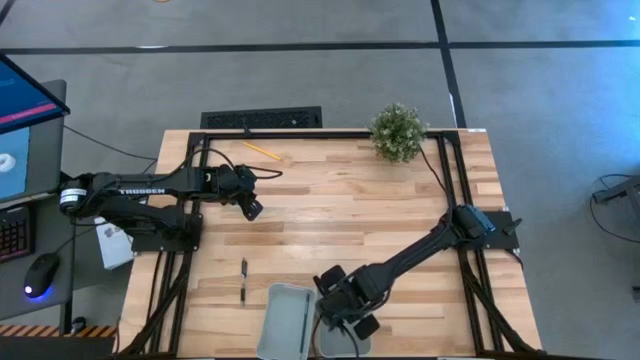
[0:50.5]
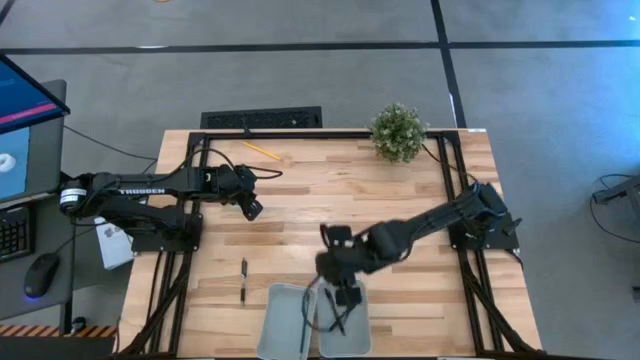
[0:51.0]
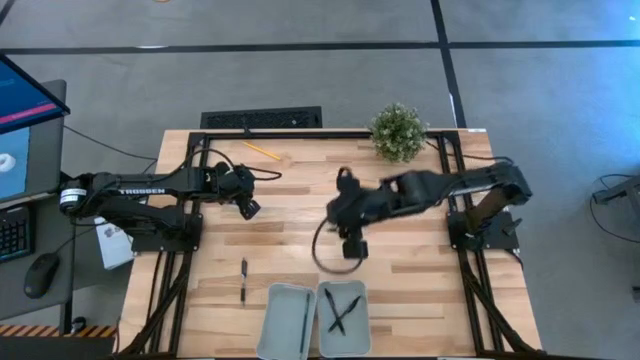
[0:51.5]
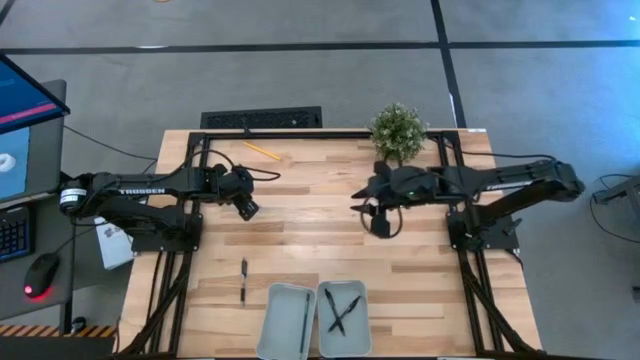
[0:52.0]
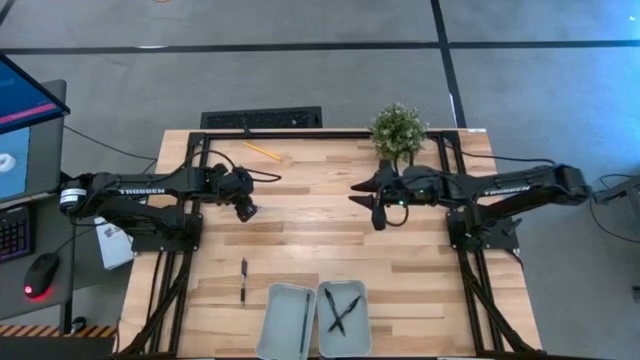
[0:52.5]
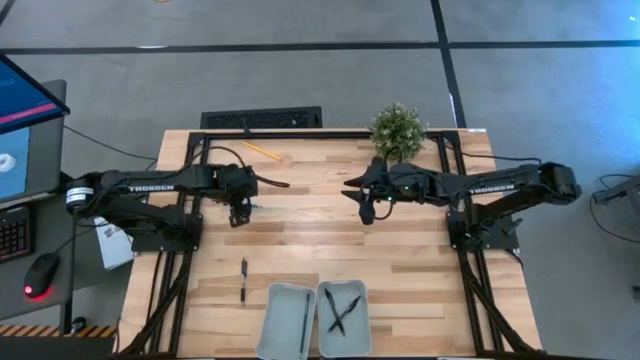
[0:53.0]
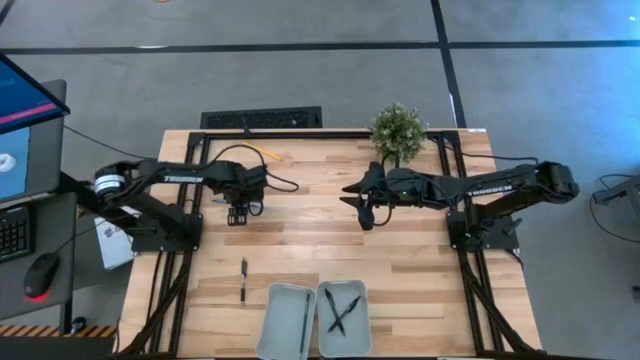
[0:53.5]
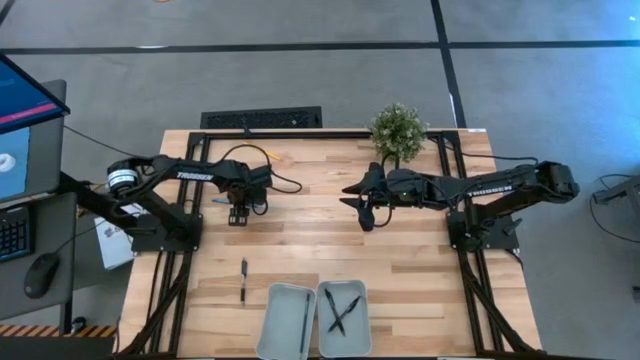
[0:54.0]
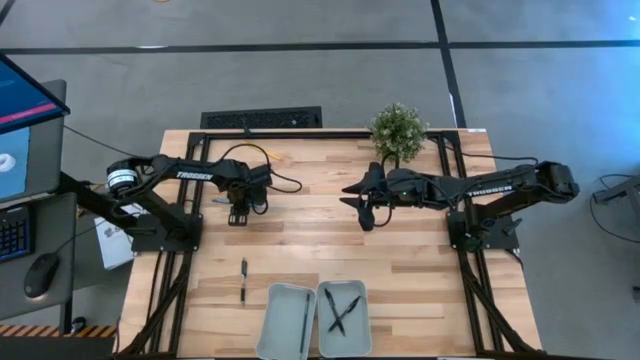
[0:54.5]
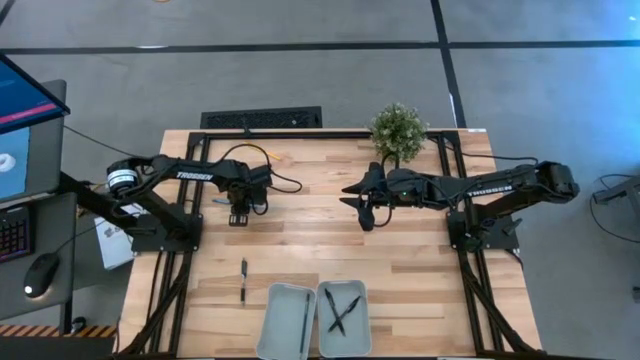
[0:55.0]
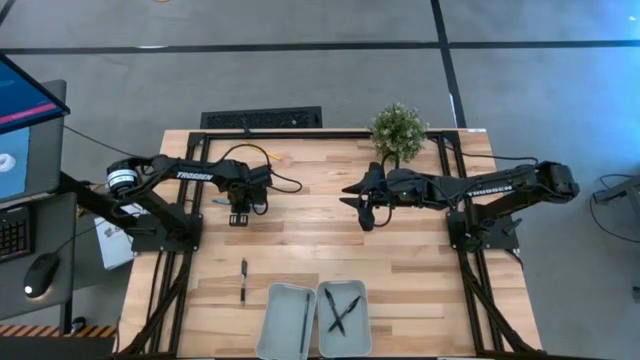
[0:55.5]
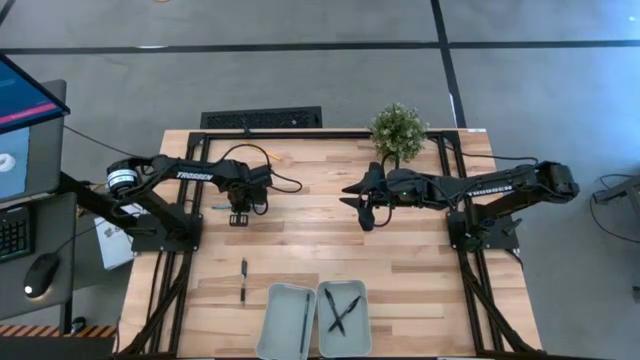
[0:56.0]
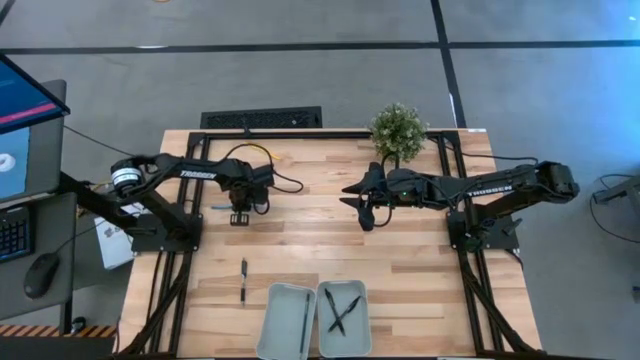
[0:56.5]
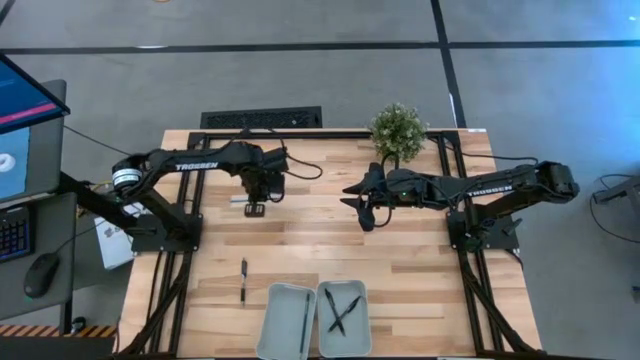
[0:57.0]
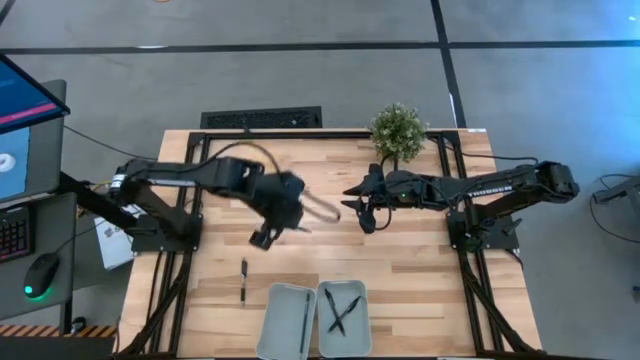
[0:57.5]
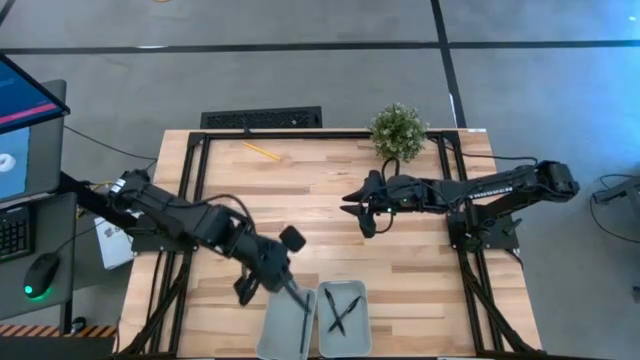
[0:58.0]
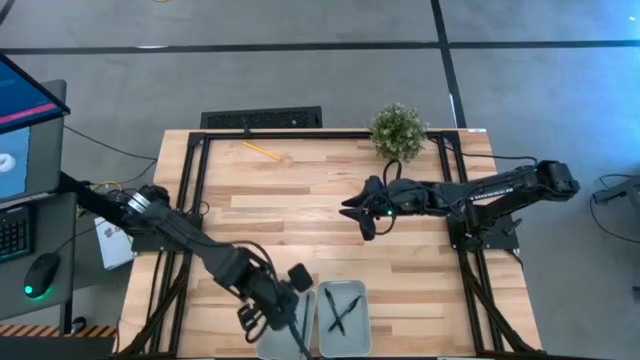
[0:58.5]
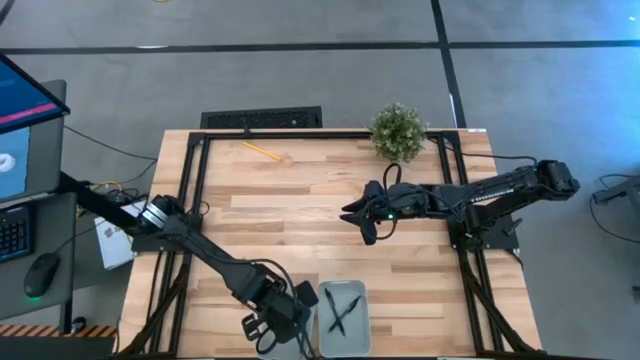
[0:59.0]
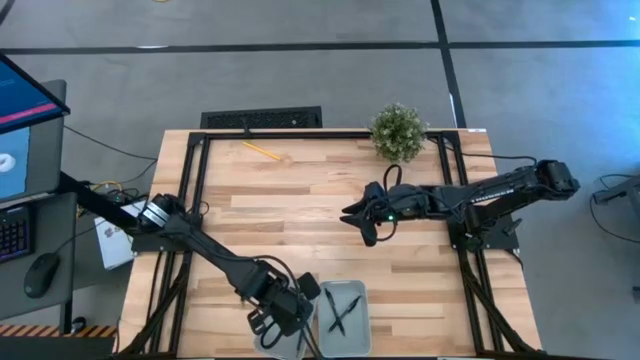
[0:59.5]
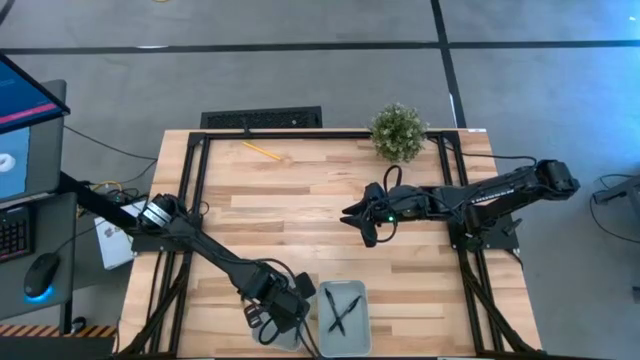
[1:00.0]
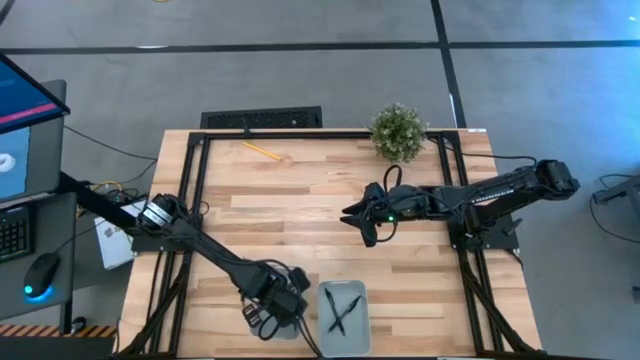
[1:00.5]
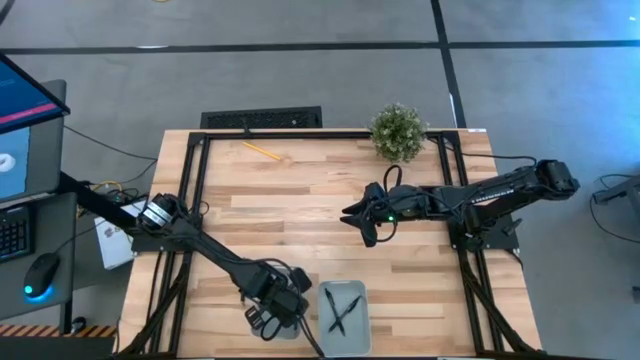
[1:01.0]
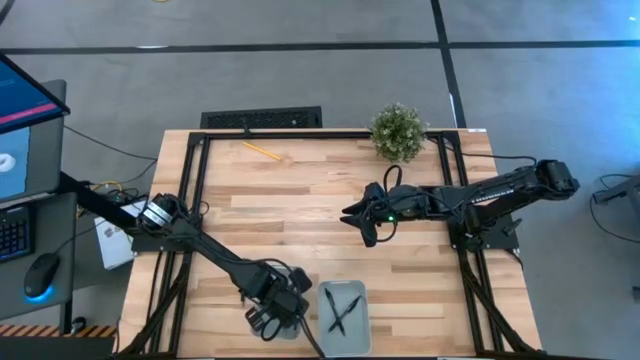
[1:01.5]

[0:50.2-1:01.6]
Task: Sort pens & pencils
Put the blue pencil into the left gray bin

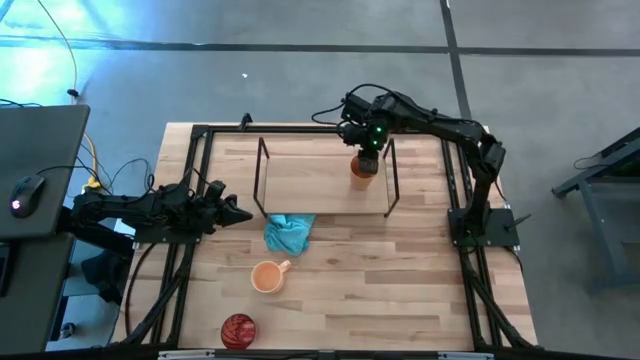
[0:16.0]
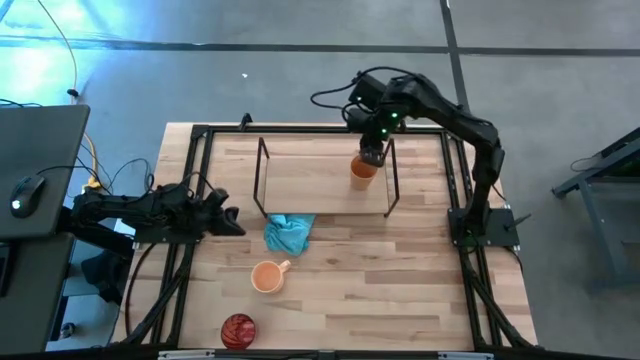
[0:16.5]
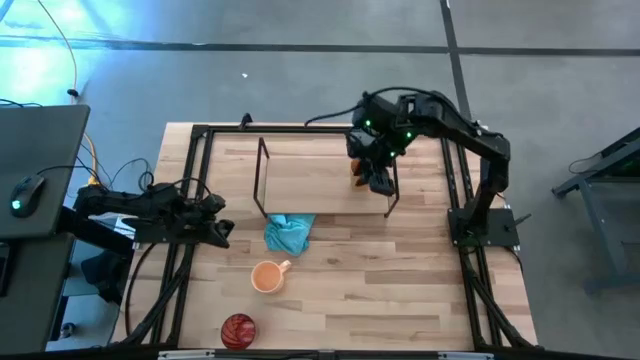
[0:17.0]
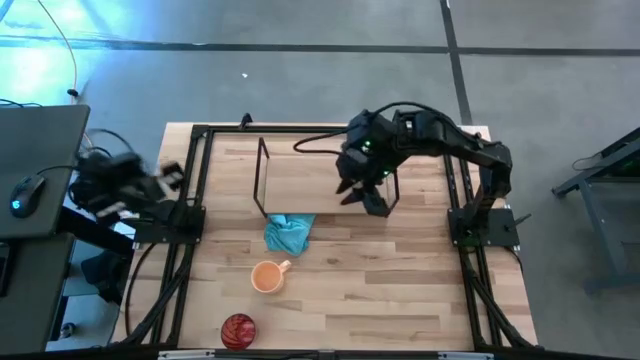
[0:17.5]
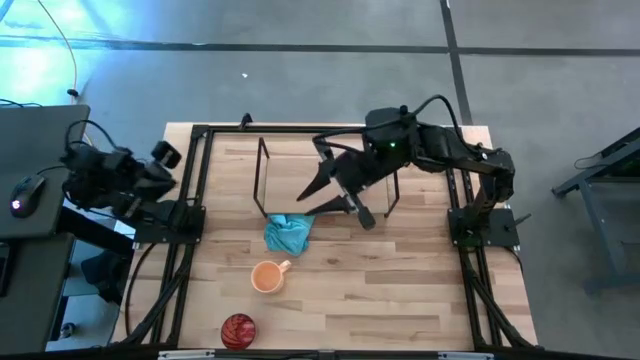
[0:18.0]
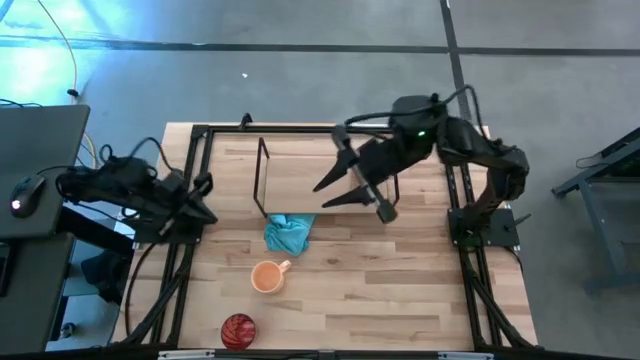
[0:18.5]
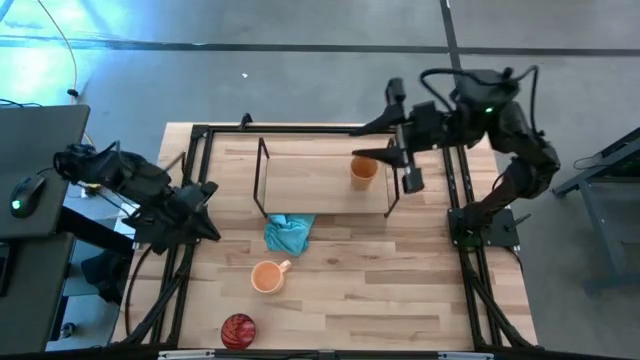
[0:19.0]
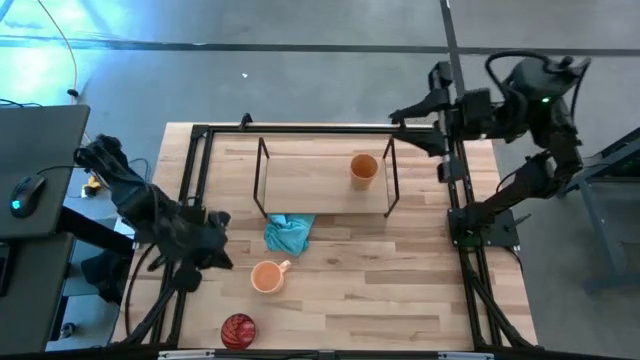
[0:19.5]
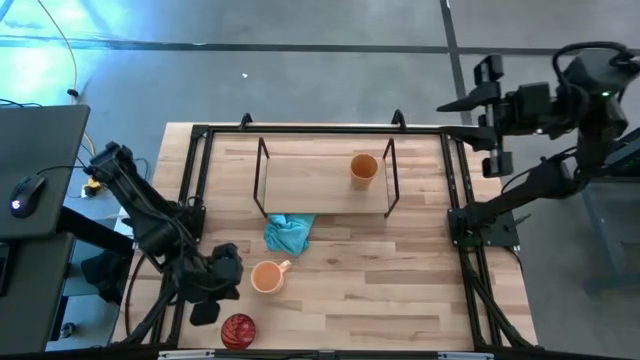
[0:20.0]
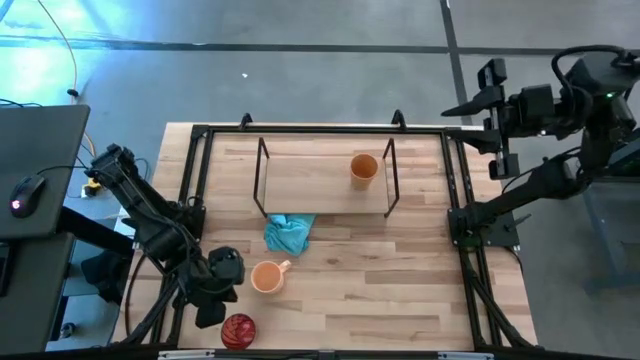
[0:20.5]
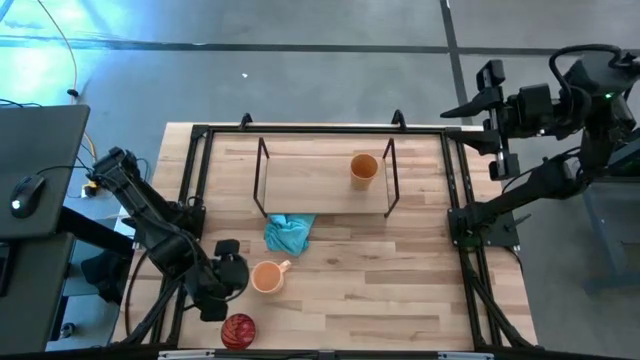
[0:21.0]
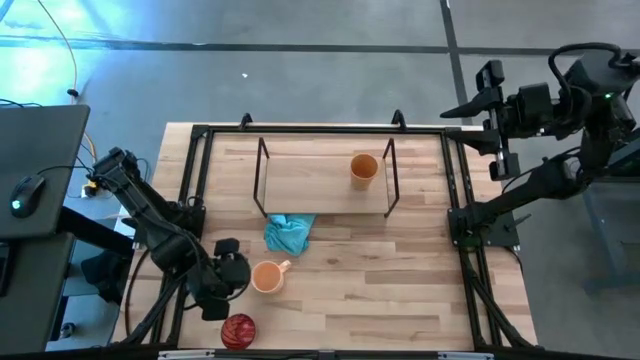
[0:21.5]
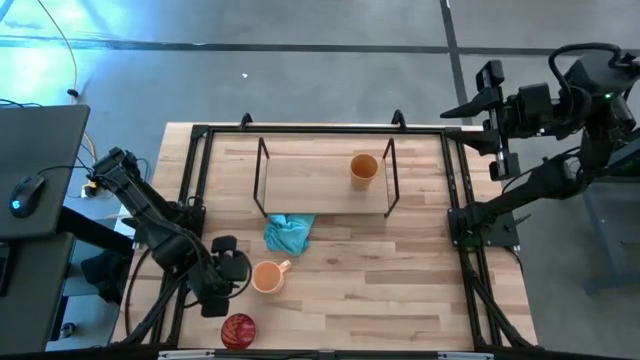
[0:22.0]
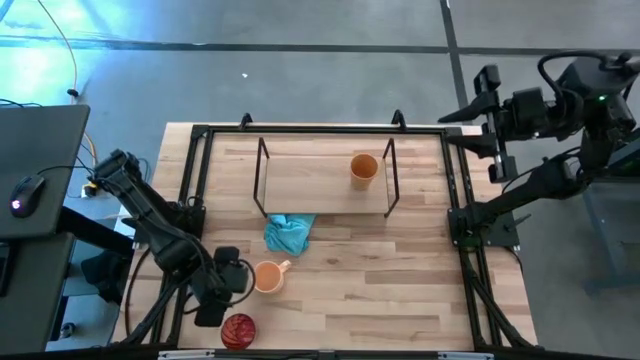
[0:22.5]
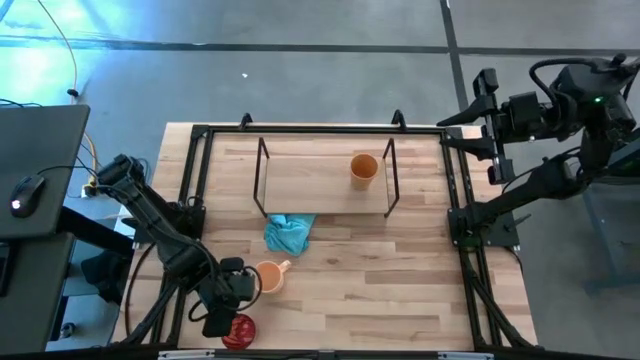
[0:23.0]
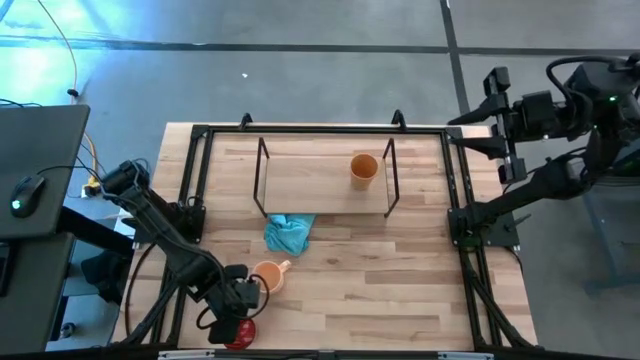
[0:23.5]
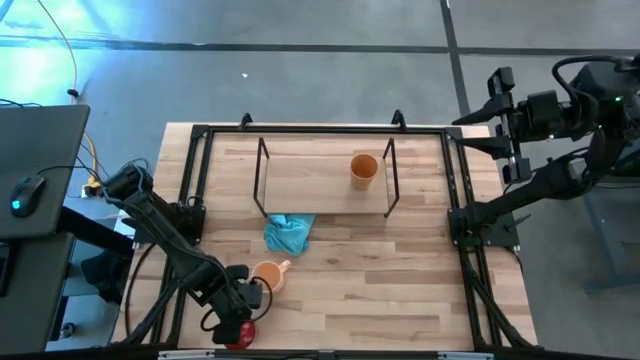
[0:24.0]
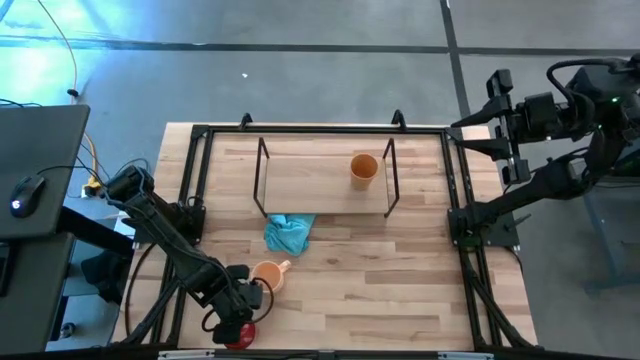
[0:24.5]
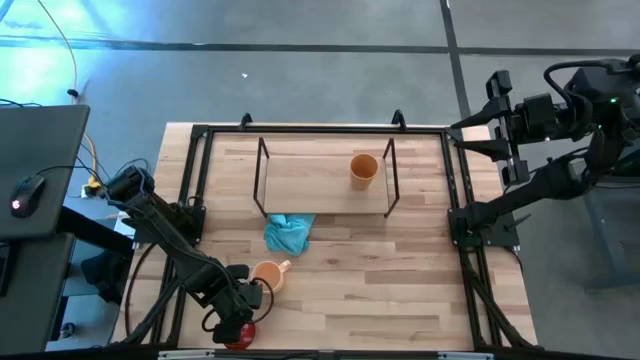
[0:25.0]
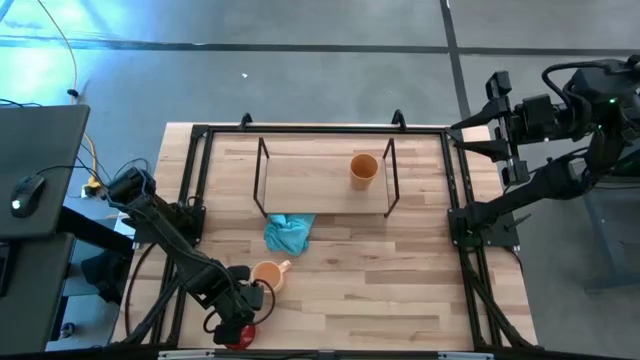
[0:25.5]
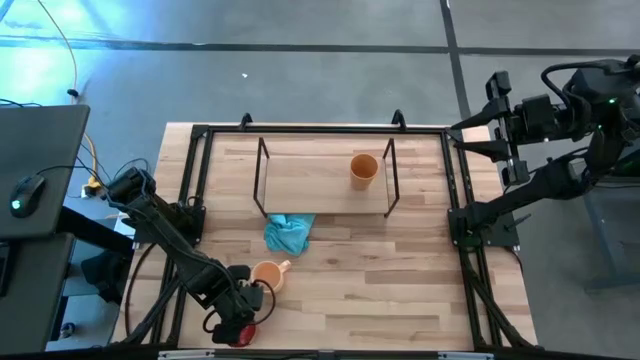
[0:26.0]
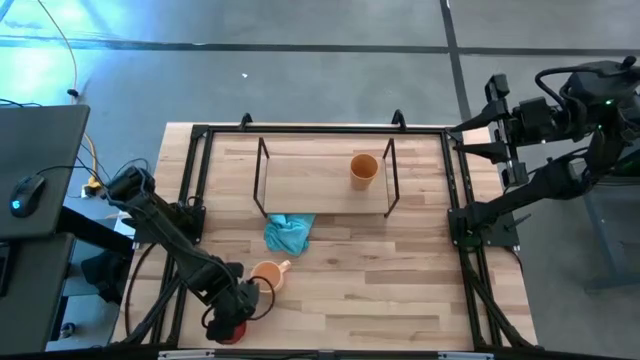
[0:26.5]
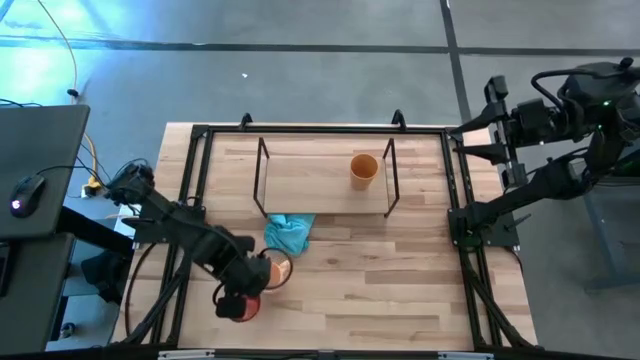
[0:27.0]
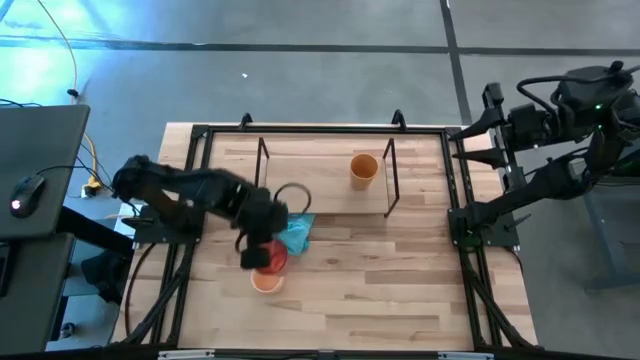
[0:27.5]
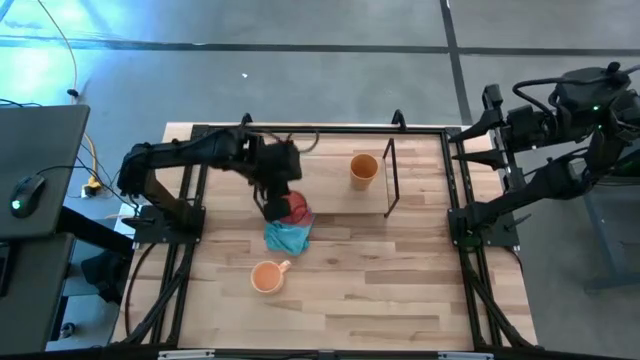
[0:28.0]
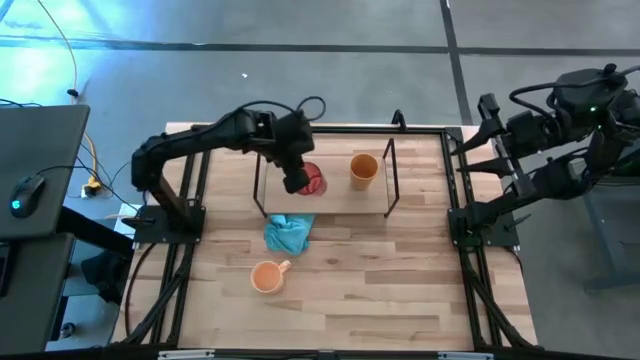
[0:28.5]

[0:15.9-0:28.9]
Task: Stack small to large cups/mugs on shelf
Put the red cup on the shelf
